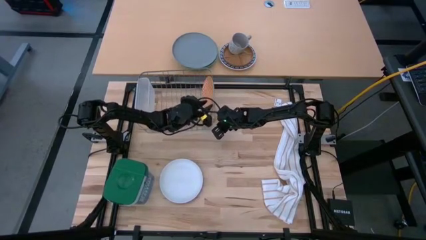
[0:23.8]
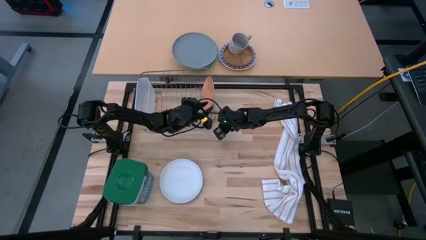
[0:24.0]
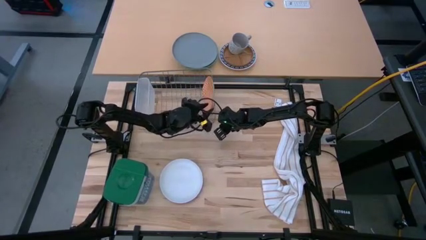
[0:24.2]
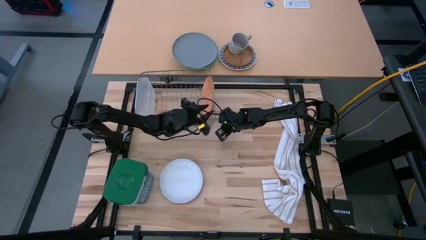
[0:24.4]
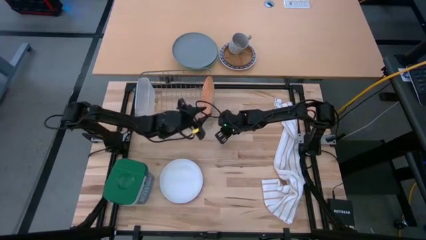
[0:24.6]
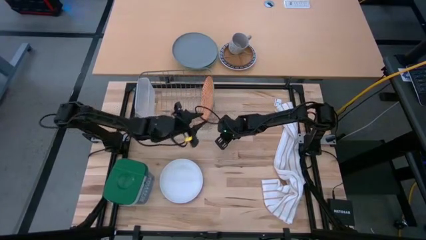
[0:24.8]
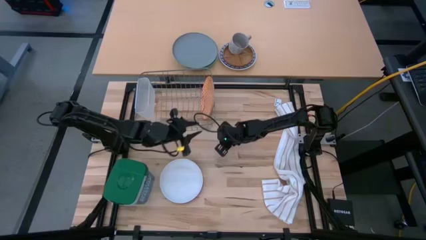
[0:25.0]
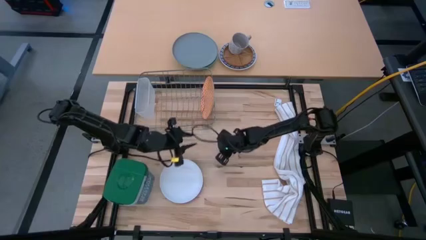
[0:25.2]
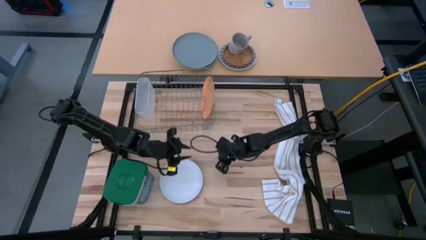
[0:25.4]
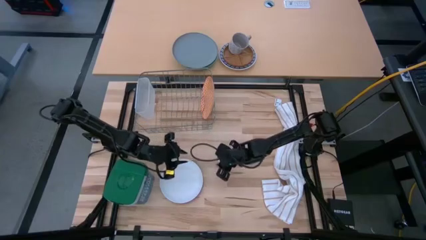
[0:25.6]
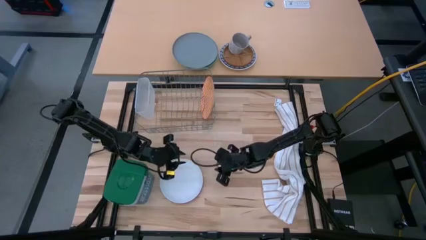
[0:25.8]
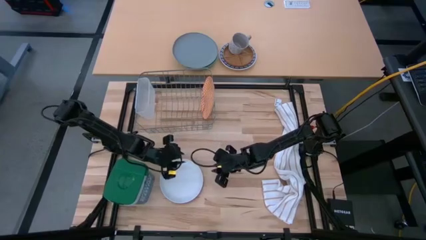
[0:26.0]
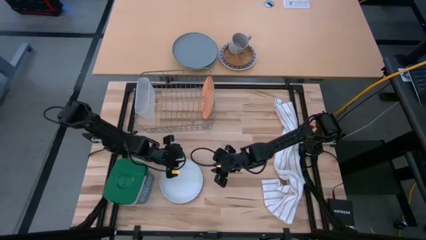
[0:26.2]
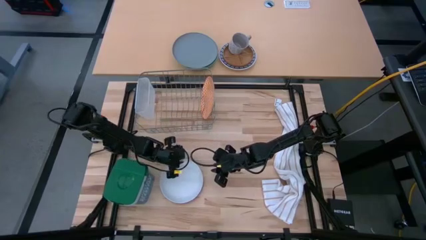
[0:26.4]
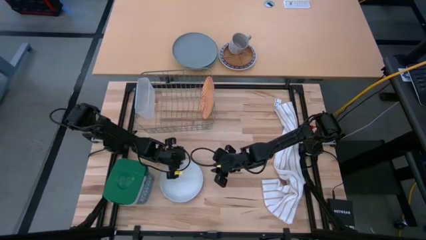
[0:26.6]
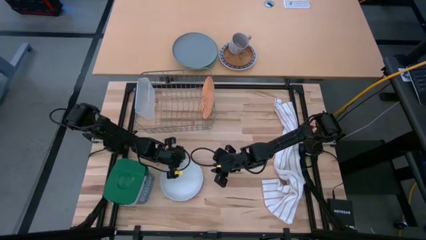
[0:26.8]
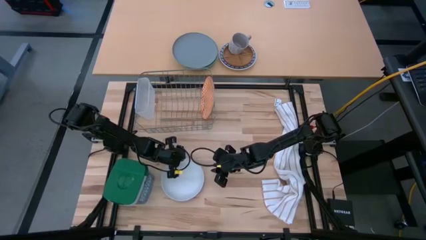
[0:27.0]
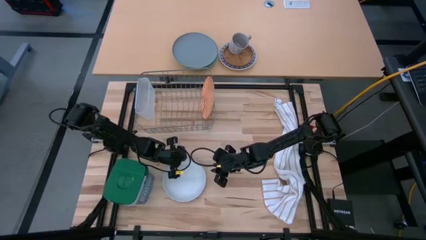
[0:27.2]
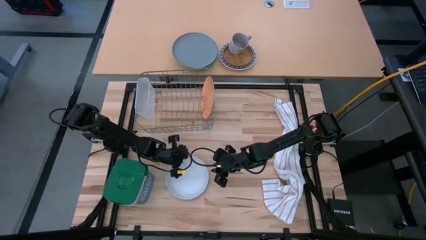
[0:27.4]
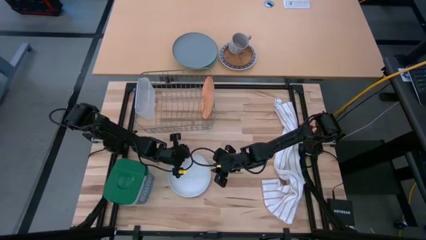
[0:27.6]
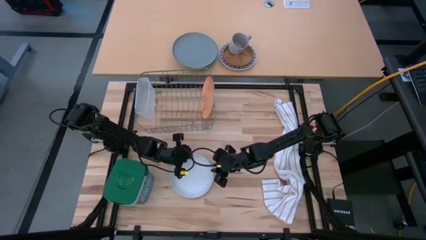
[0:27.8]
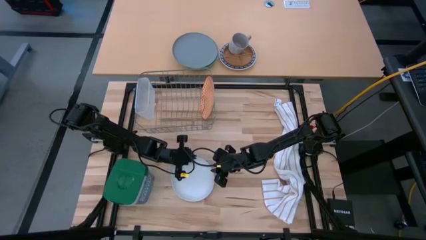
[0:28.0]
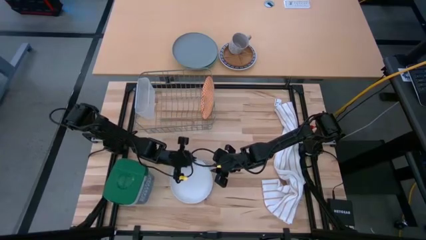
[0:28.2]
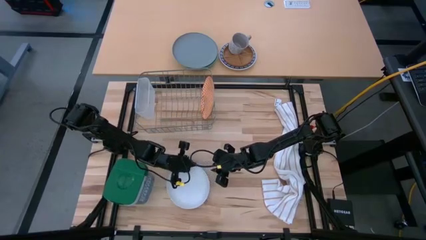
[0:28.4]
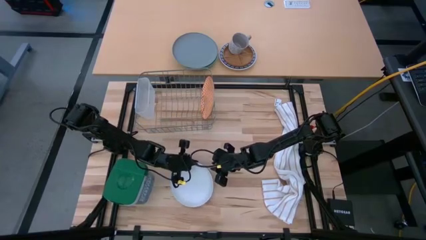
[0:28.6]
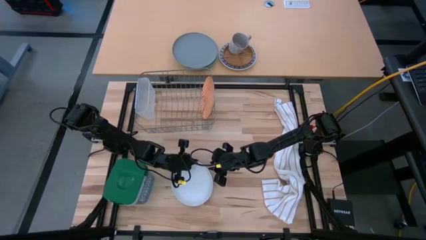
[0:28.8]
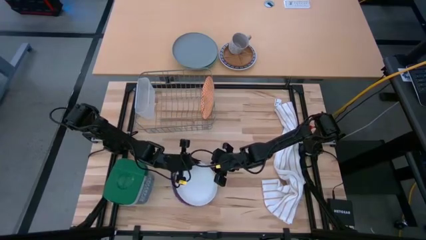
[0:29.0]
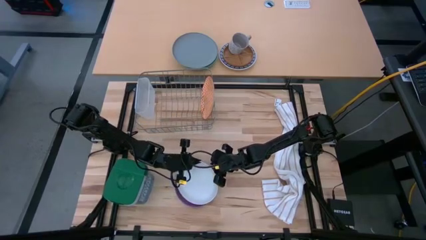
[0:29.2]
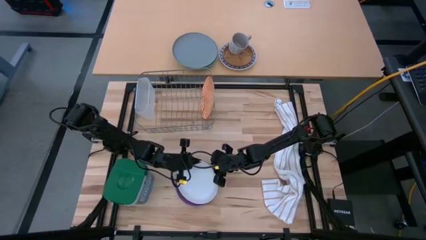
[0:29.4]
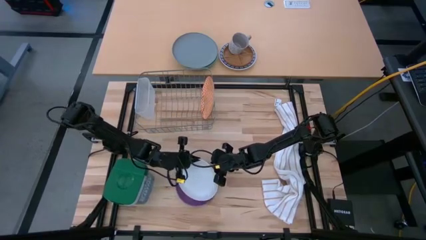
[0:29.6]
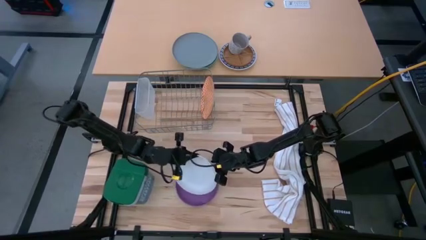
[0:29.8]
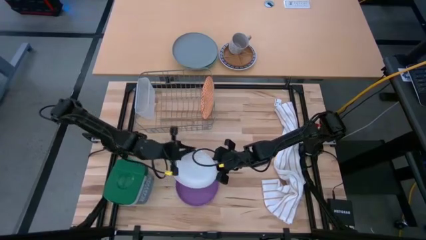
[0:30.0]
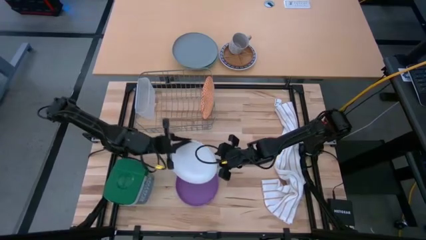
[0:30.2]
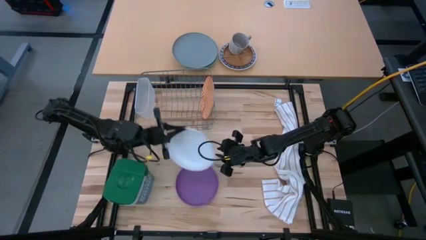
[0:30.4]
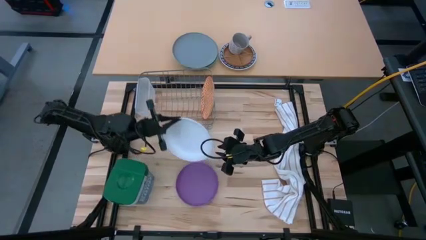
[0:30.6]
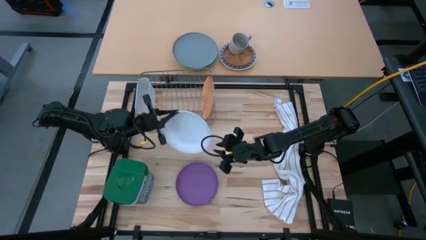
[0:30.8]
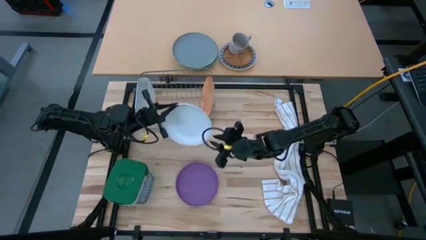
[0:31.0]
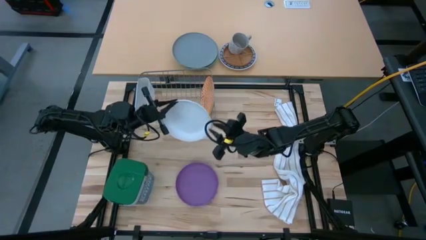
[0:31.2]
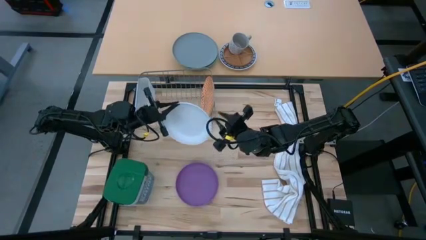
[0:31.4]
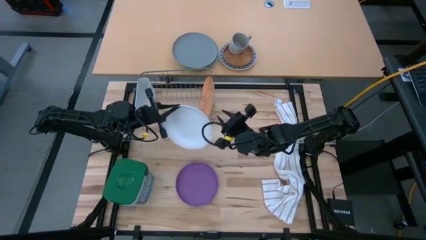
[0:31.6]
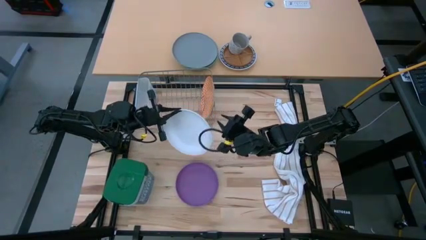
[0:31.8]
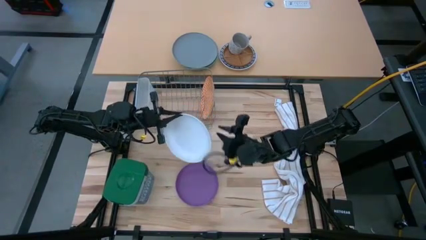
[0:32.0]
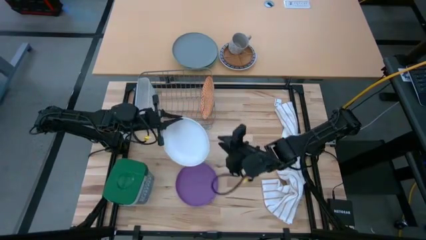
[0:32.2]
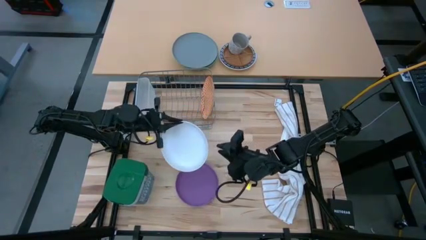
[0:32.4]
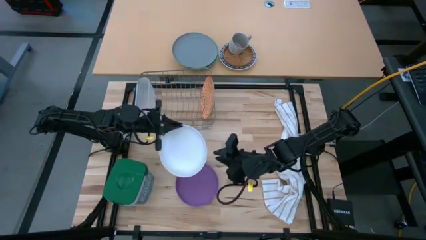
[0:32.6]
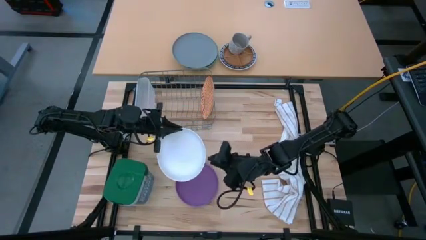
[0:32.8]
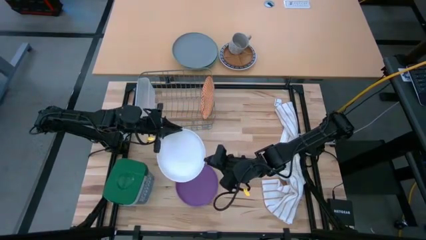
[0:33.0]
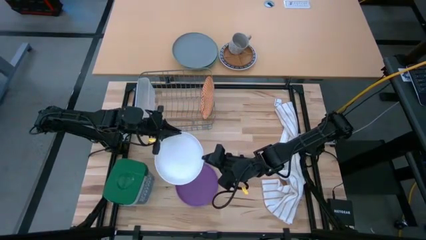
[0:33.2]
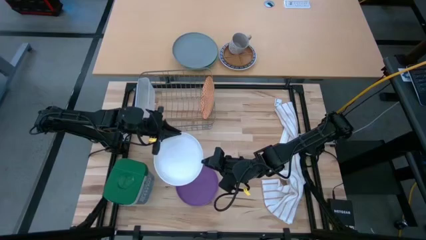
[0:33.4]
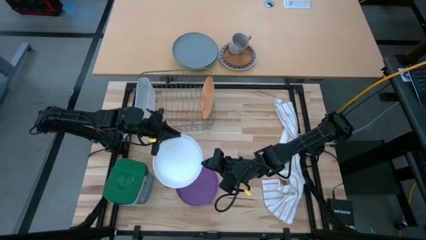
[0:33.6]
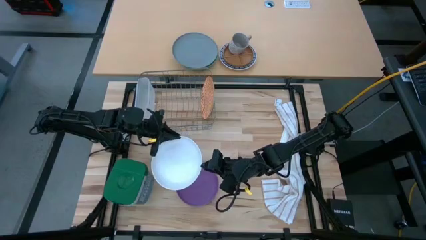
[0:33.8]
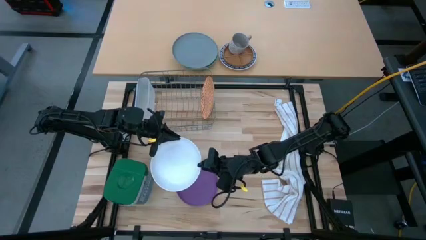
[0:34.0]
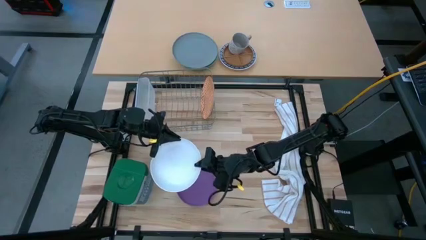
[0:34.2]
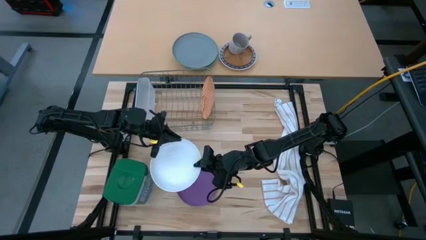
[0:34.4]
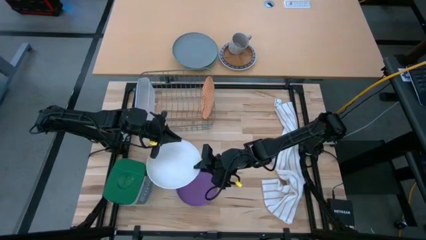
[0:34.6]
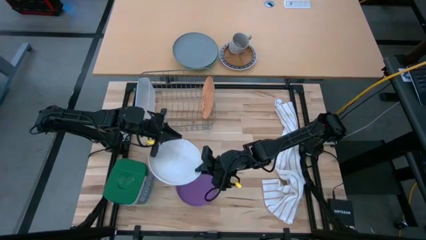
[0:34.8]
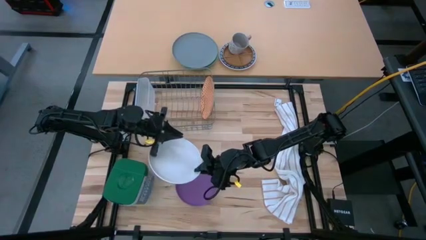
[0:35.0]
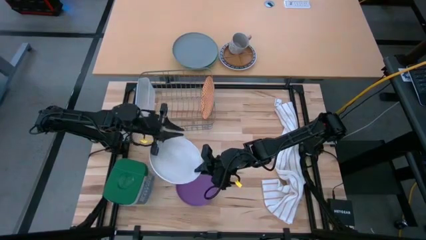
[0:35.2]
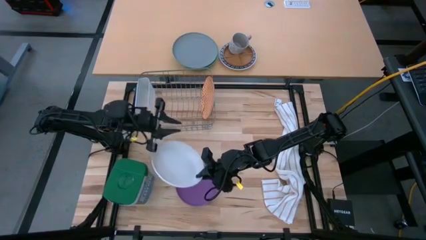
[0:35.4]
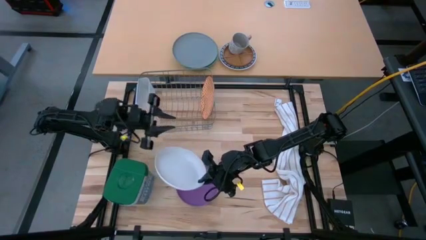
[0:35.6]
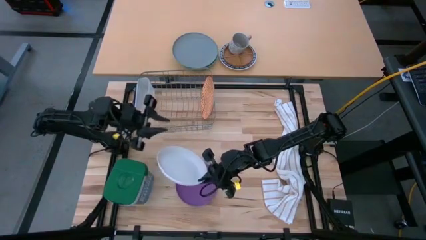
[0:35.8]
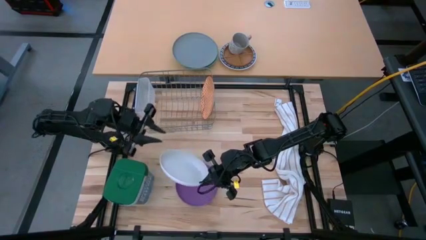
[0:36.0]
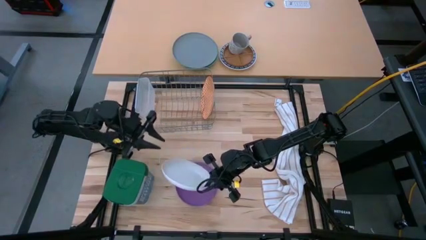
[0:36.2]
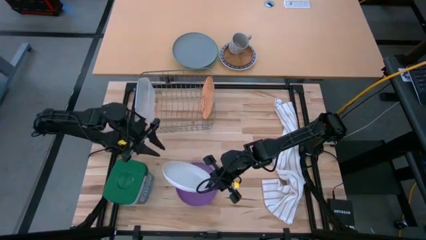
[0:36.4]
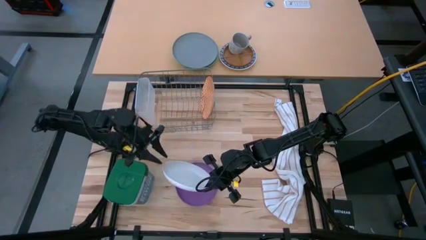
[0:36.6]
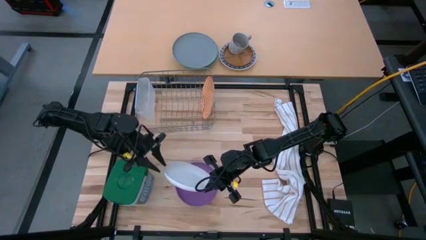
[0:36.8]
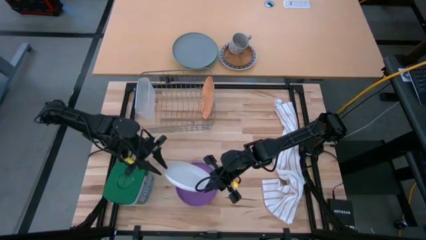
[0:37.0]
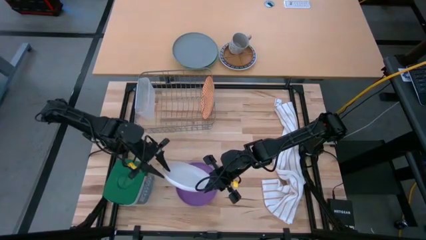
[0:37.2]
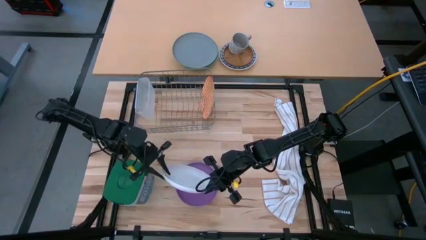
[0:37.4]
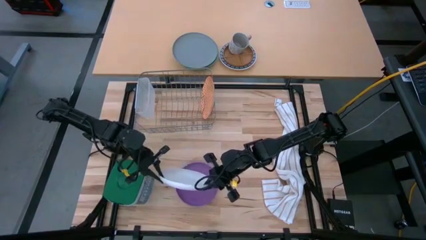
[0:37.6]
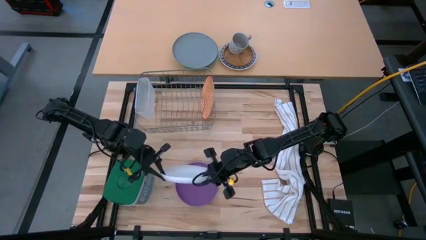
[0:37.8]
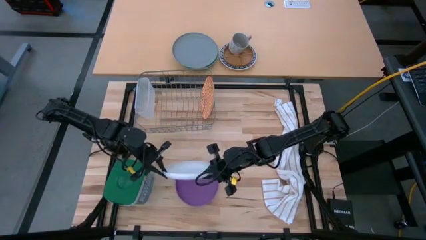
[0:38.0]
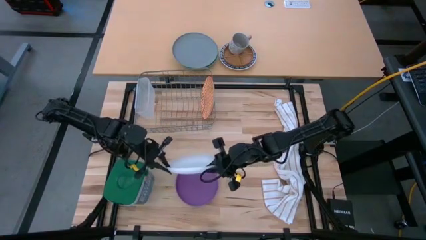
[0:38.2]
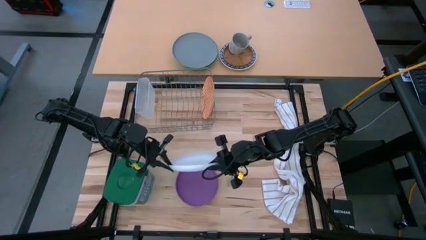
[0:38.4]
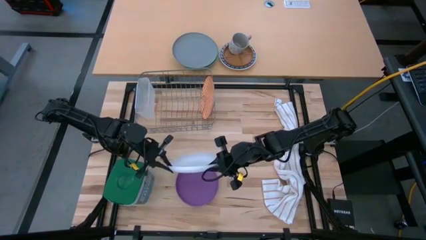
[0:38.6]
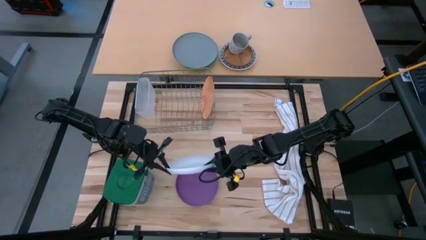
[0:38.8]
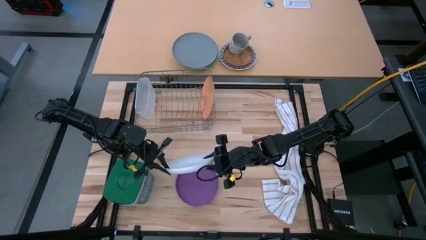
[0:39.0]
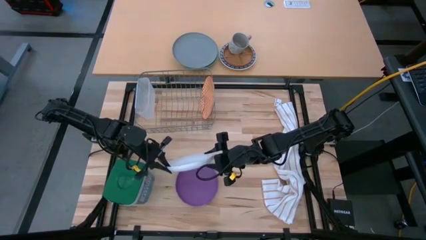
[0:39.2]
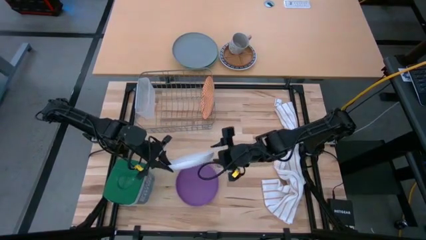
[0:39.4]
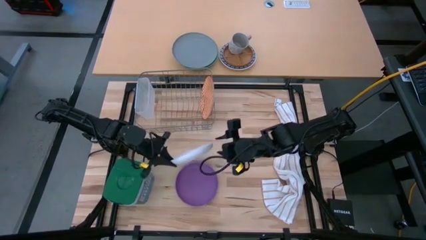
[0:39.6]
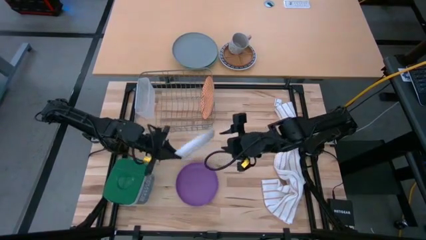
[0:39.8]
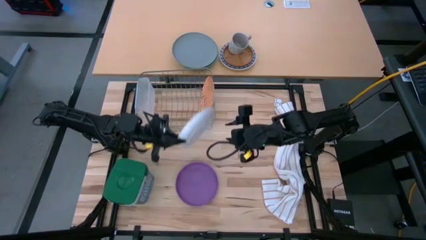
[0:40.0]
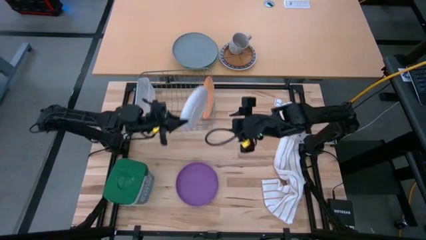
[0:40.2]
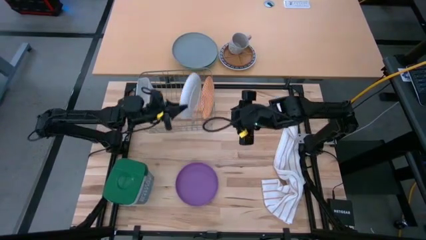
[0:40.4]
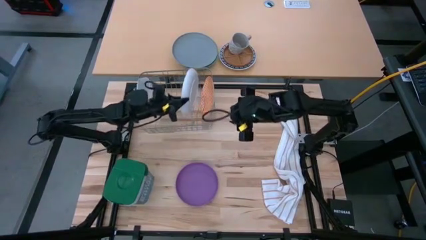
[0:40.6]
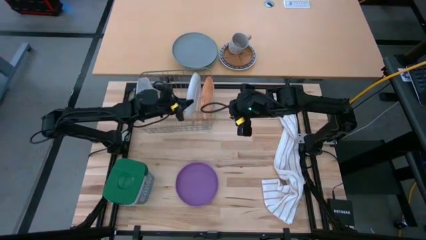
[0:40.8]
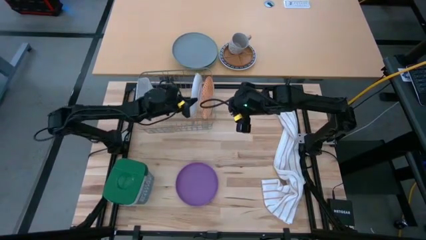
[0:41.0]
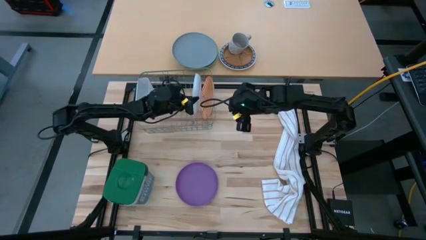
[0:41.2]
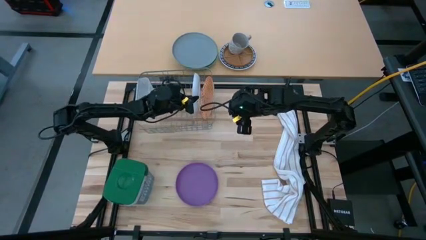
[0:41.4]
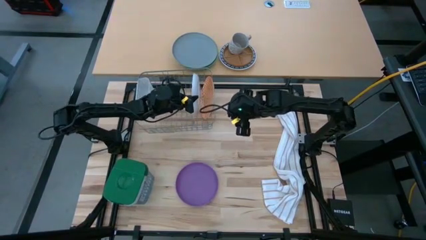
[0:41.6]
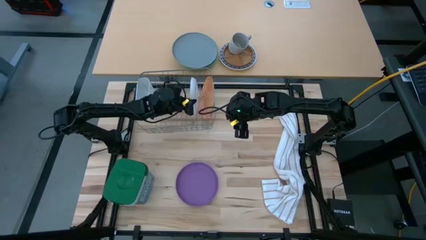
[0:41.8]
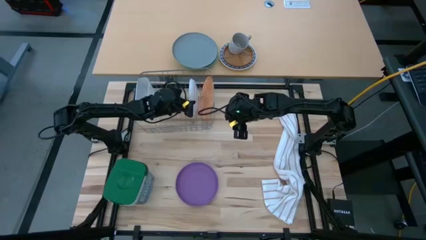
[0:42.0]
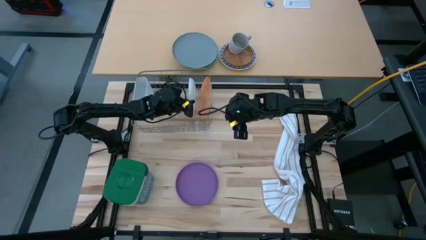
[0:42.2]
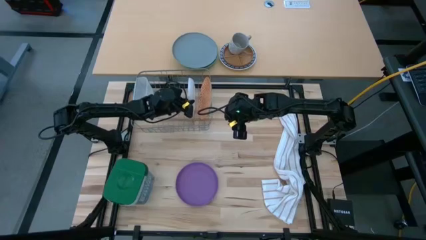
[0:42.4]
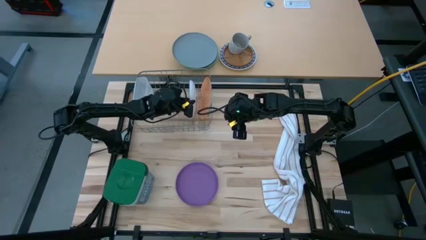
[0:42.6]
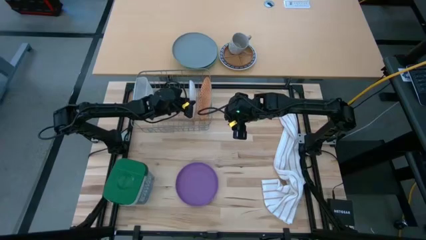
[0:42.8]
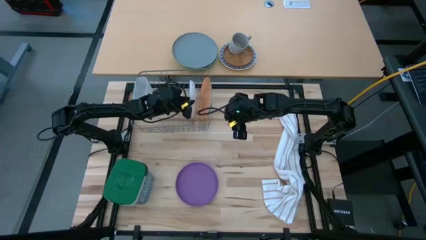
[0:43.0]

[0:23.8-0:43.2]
Task: Sort dishes
Put the white plate into the dish rack
